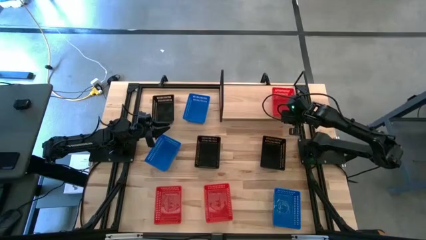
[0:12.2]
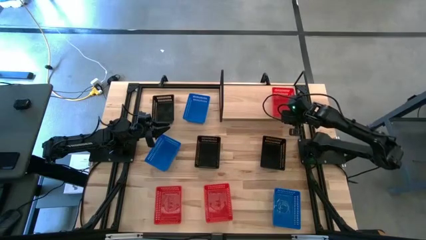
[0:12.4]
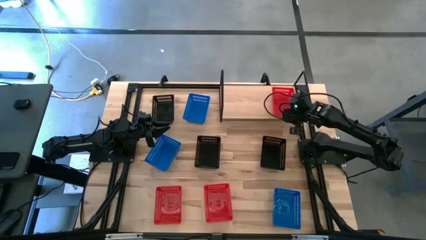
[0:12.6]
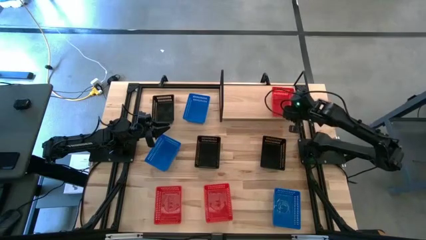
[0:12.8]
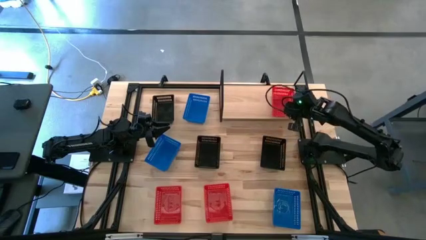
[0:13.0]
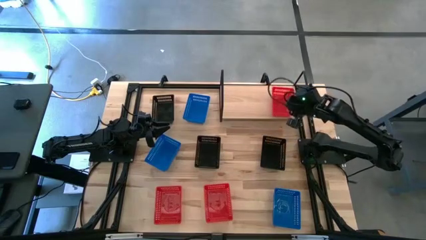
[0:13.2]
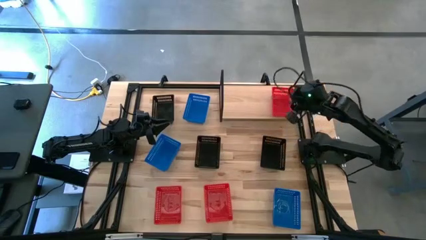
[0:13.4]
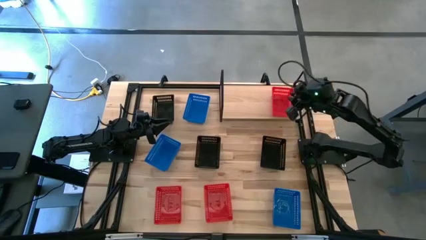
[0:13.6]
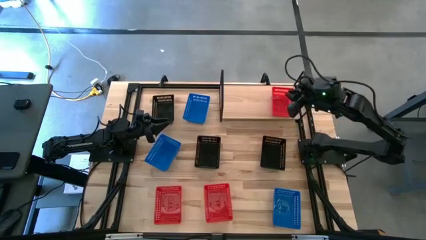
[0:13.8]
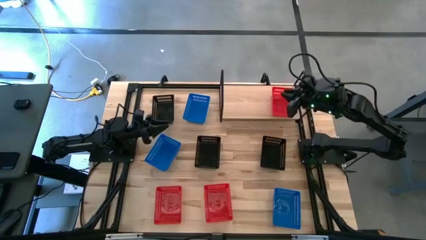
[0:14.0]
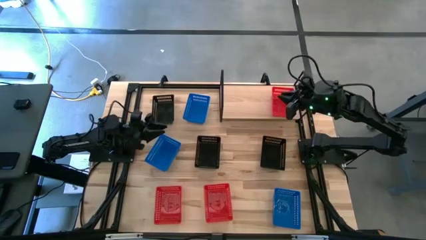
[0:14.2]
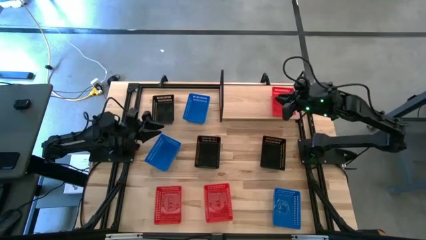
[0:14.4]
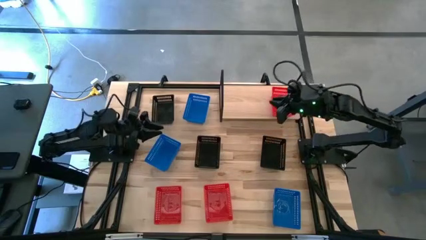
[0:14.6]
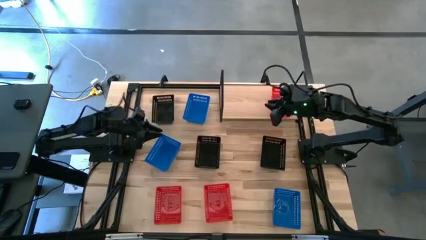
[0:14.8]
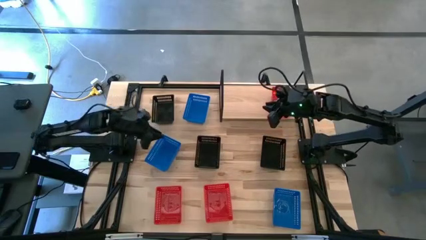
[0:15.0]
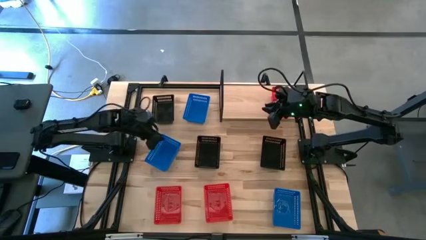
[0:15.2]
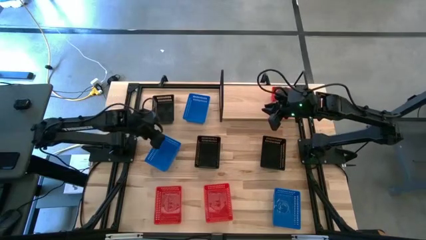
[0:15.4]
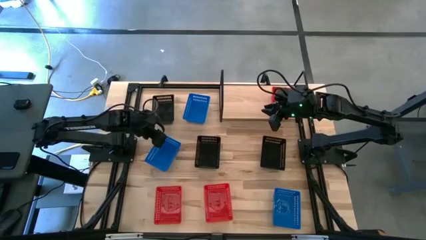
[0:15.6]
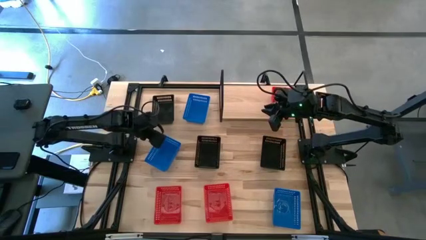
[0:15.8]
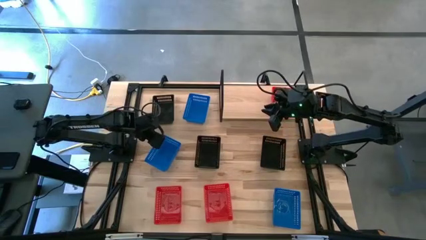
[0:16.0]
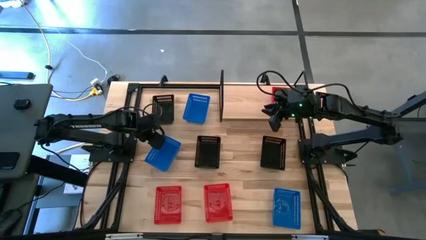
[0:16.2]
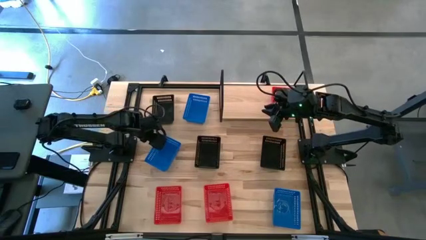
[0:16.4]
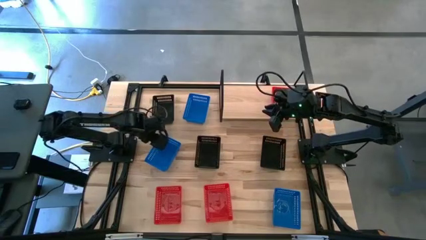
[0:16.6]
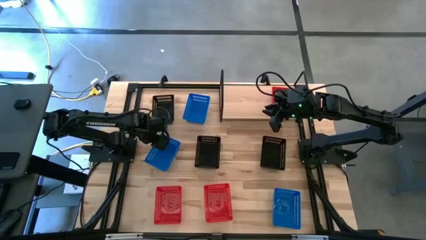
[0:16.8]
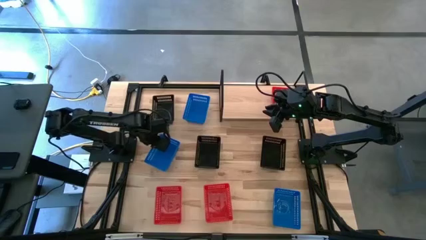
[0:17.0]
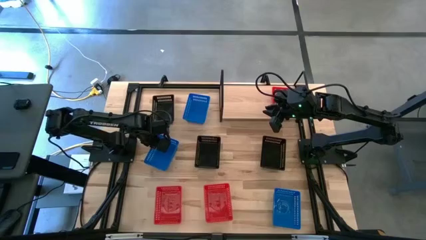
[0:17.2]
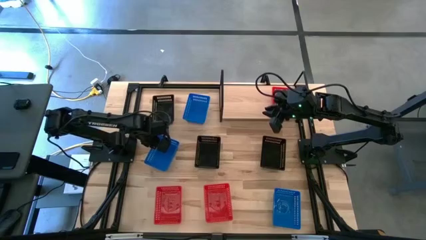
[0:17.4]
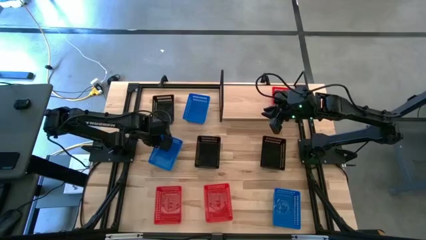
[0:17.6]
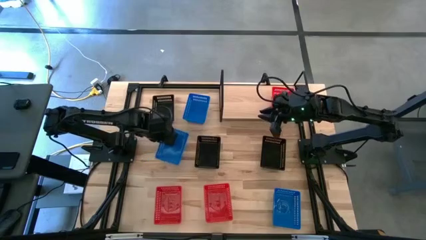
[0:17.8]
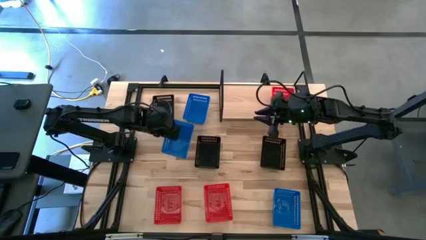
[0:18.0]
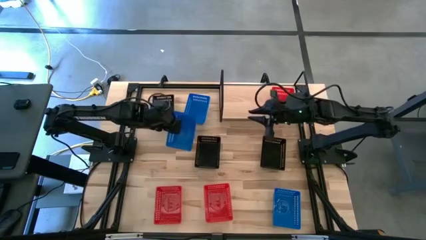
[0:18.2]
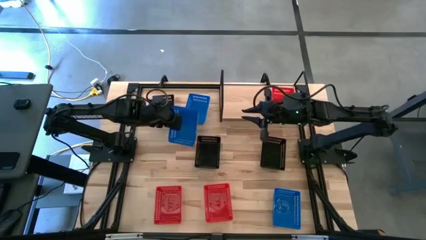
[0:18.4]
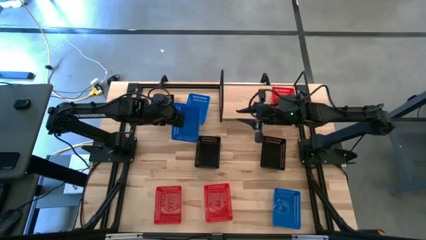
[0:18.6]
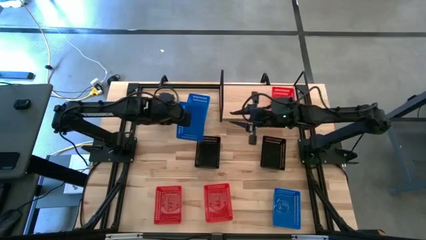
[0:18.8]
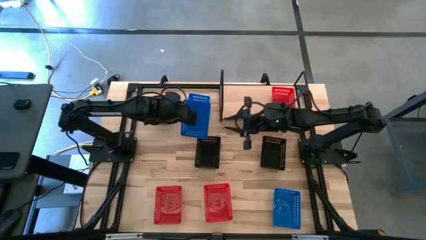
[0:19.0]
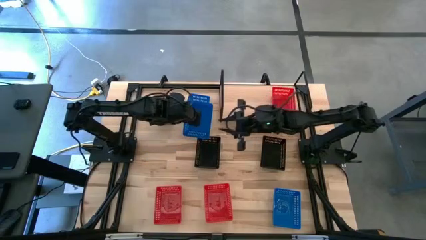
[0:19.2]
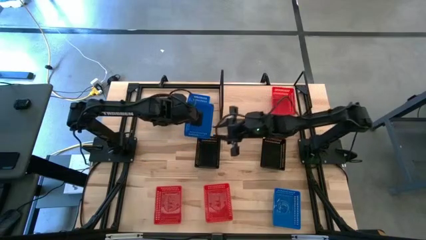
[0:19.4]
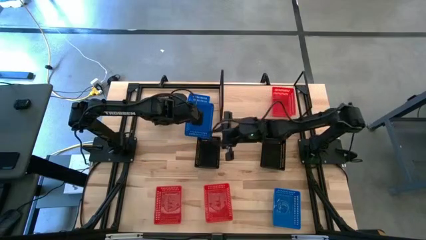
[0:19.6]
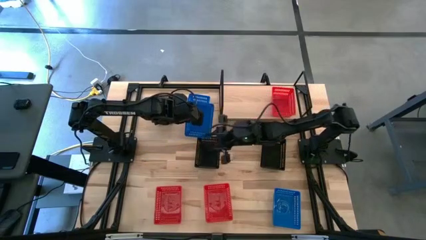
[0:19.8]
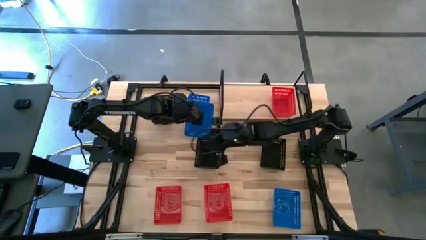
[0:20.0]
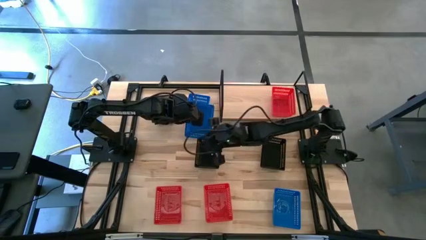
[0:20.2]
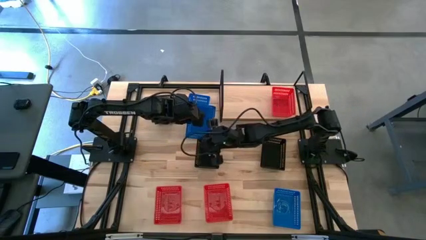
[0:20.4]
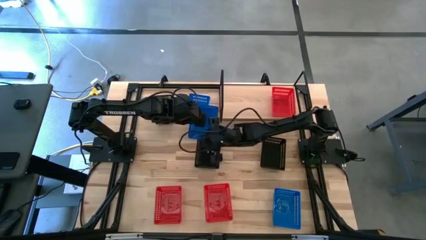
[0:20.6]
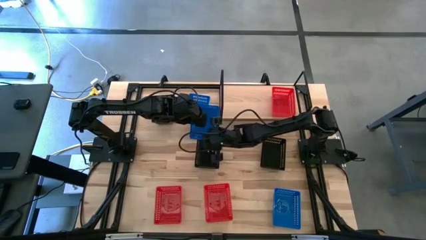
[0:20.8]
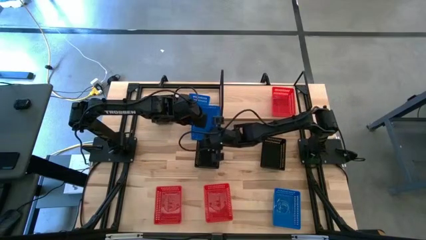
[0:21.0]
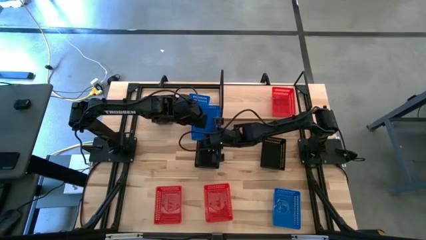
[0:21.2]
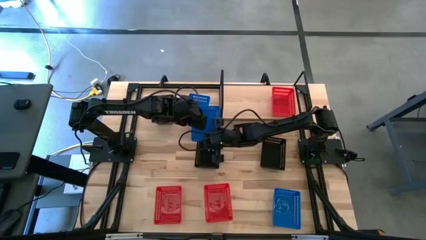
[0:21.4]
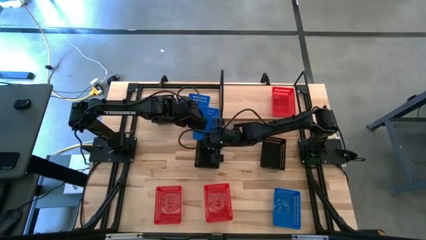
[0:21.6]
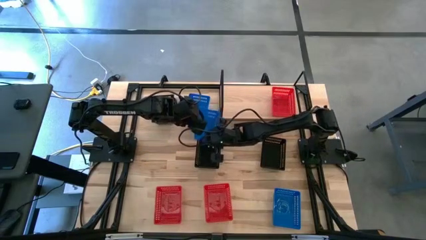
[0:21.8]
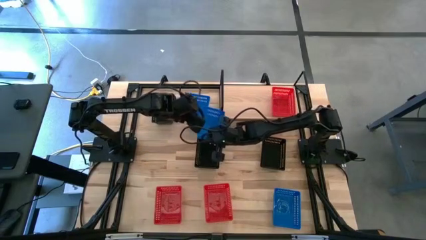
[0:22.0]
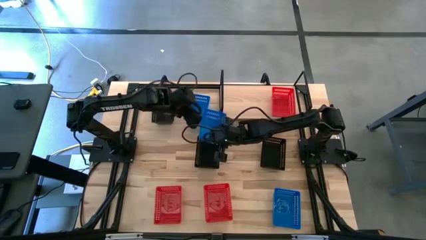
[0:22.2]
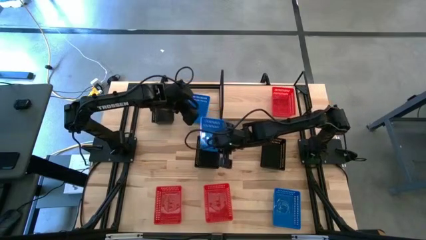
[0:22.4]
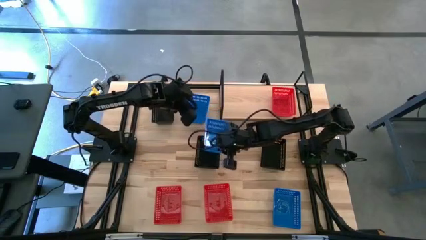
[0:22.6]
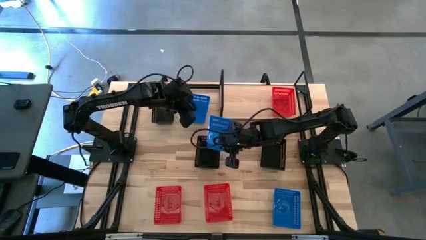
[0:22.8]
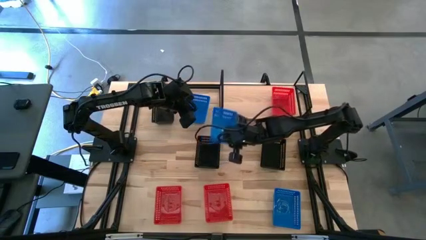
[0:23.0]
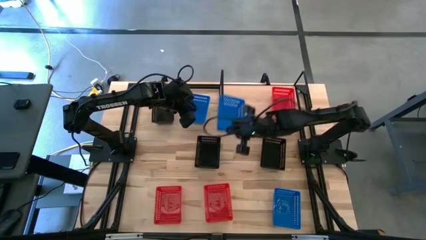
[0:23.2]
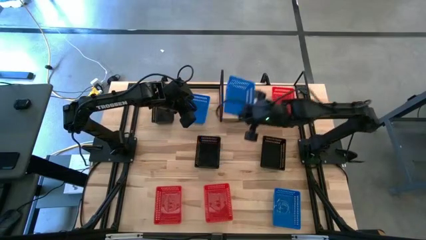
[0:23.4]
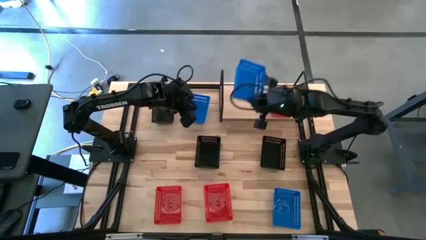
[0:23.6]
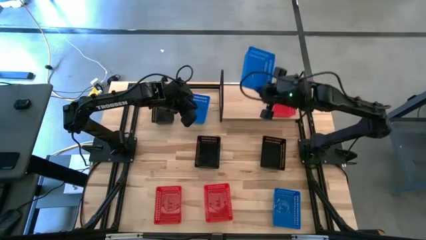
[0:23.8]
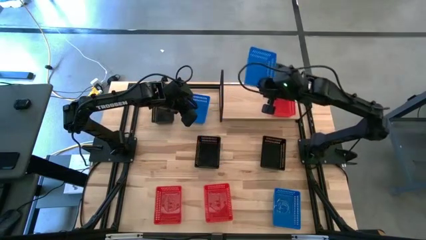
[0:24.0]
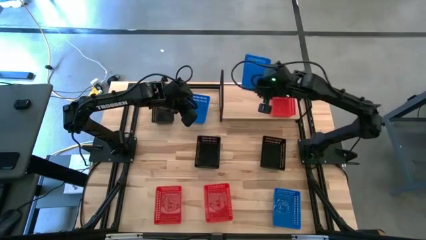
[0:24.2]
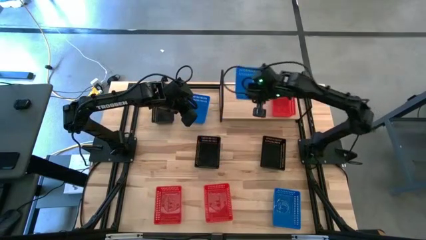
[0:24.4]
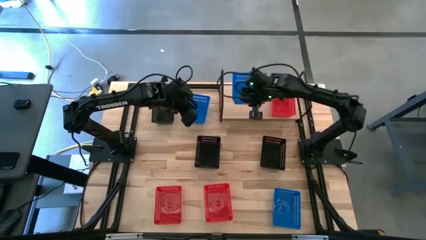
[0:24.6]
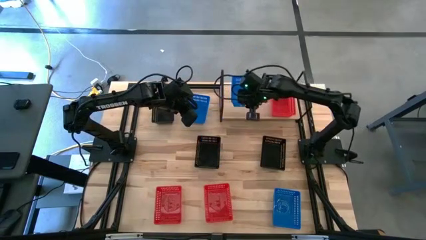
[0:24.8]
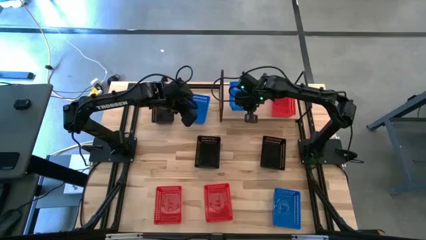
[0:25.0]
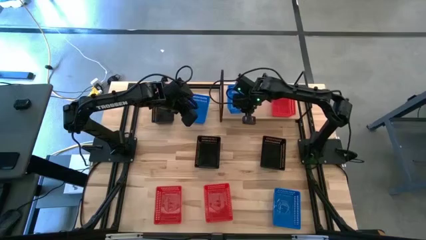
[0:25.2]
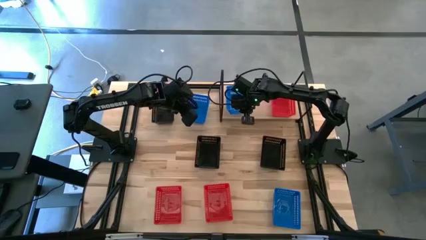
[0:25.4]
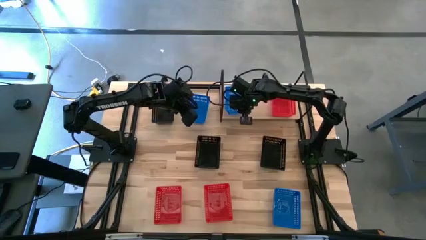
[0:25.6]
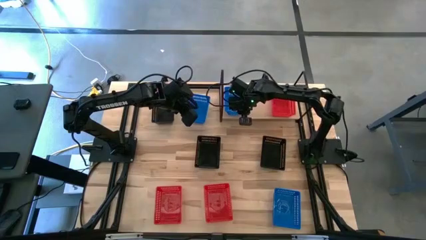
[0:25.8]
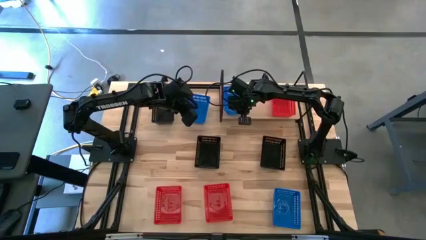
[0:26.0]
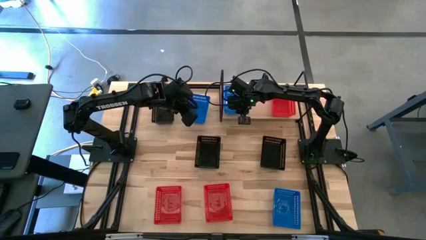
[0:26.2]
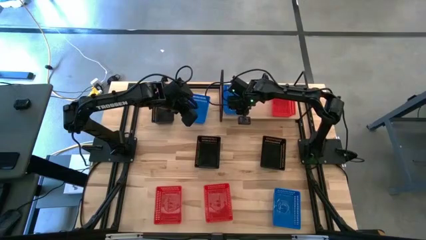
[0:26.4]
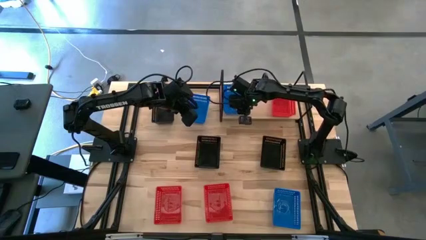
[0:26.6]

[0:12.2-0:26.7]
Task: Stack baskets on shelf by color
Put the middle left blue bin on the shelf

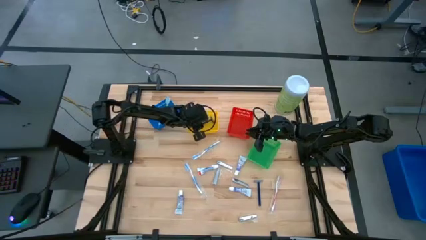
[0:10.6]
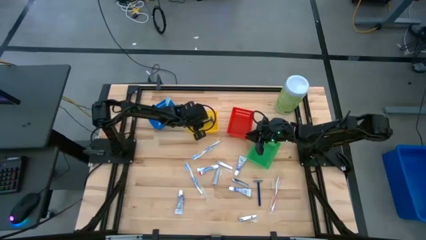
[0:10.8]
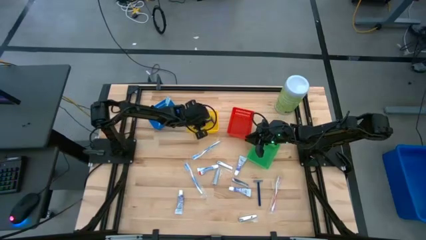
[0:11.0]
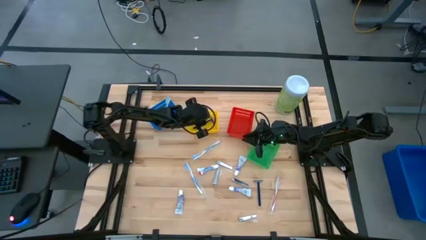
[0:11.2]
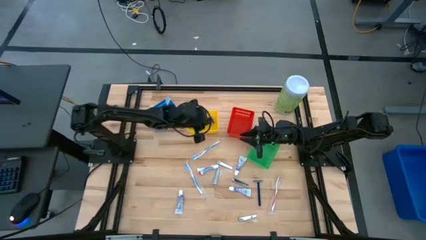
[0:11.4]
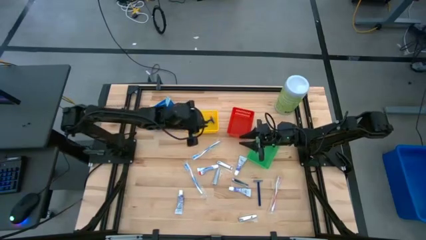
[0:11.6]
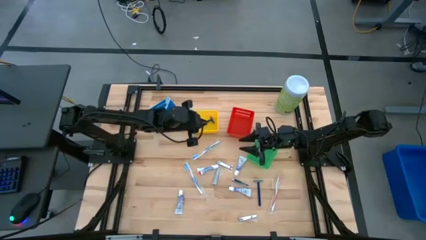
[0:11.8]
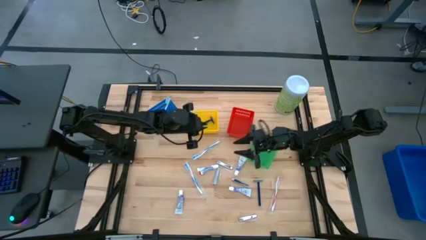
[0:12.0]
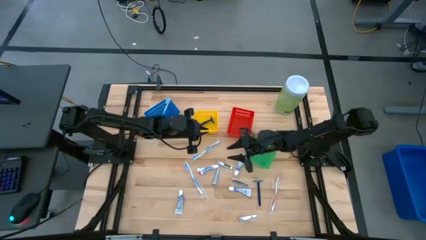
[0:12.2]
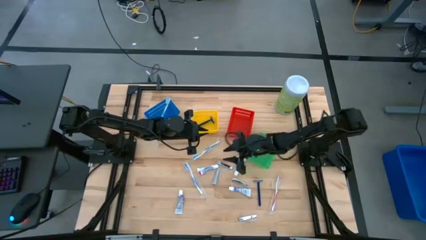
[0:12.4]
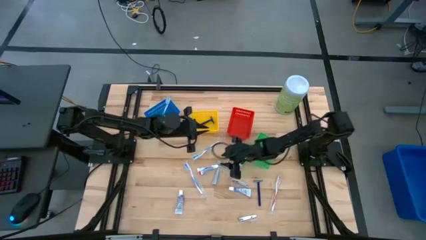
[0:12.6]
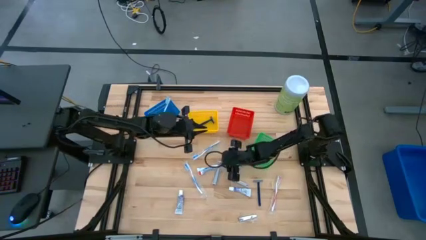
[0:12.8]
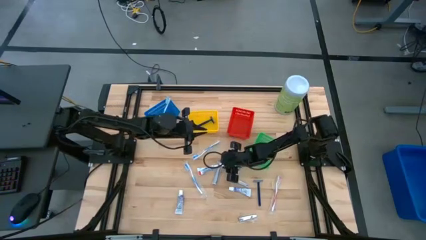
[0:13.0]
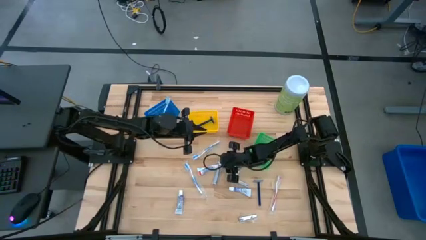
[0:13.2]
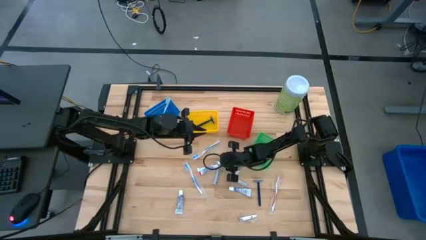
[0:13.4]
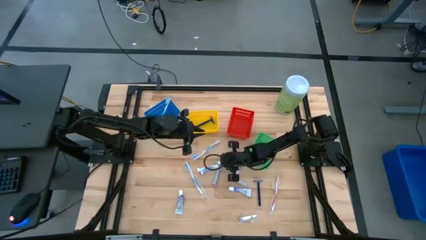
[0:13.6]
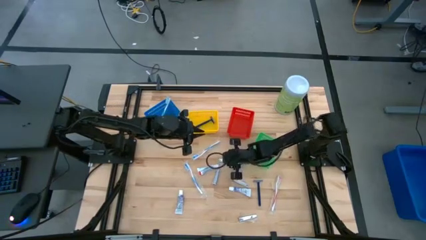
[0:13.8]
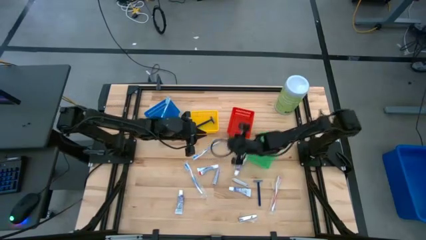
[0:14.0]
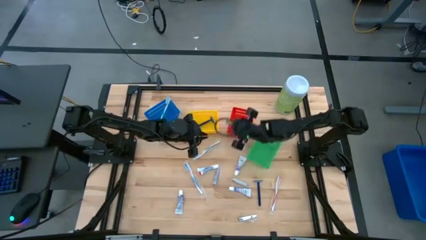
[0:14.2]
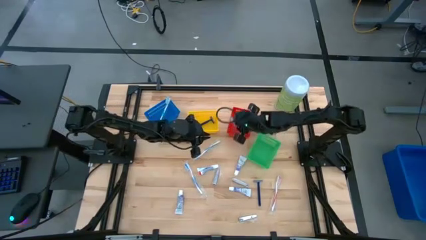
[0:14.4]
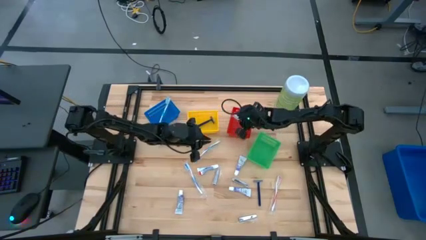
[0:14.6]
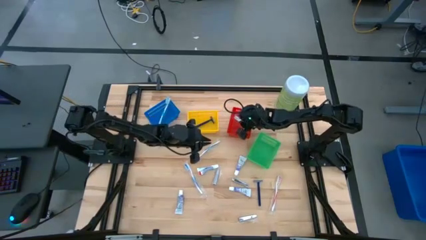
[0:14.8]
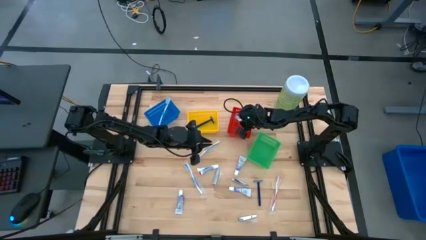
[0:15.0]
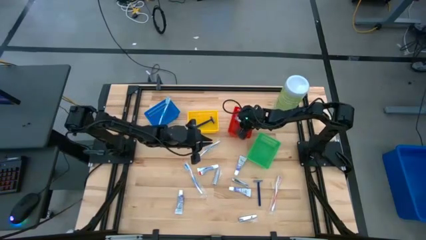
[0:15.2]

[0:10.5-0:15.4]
Task: Pick & Place Travel size toiletries
Put the silver nail cutter into the red bin
